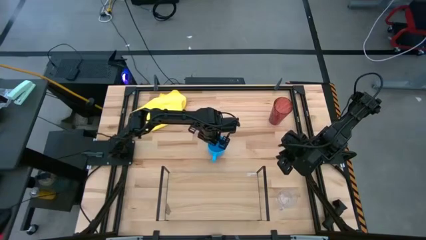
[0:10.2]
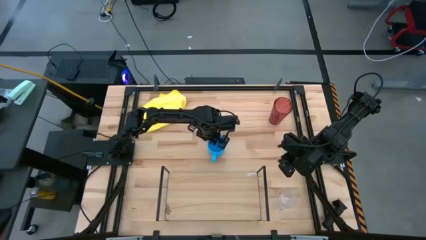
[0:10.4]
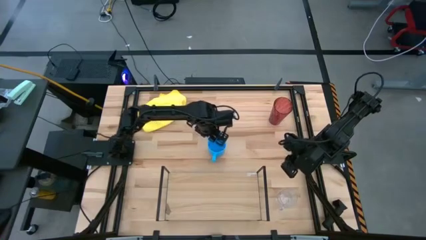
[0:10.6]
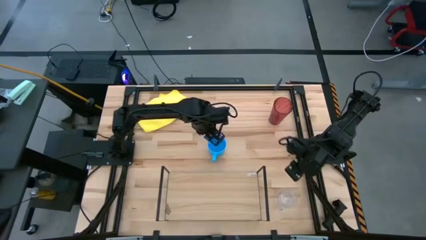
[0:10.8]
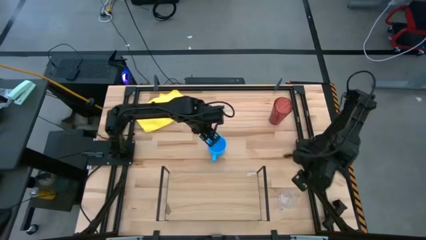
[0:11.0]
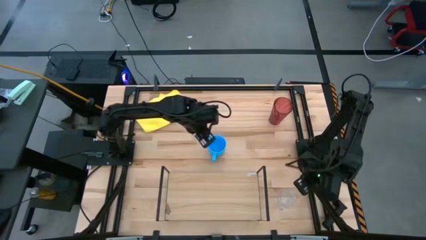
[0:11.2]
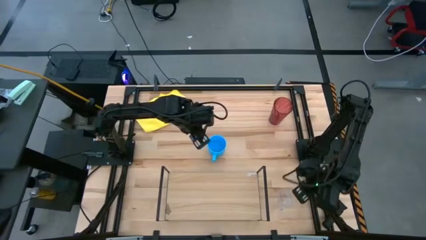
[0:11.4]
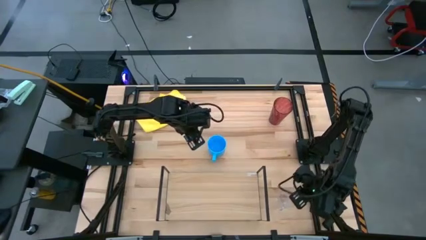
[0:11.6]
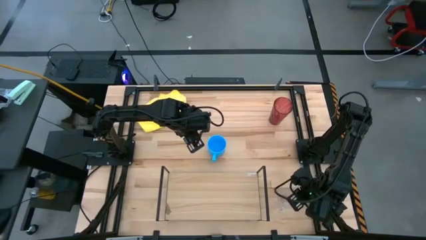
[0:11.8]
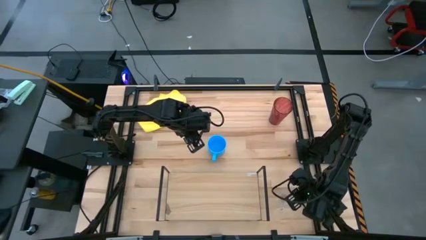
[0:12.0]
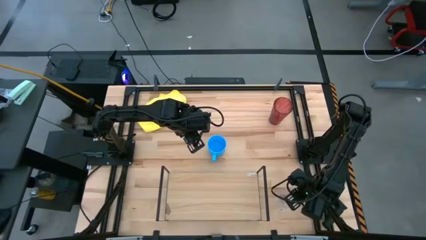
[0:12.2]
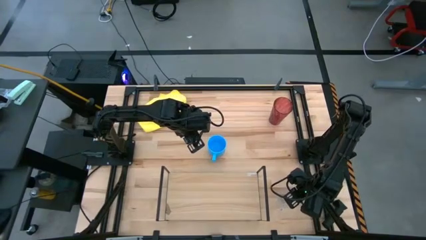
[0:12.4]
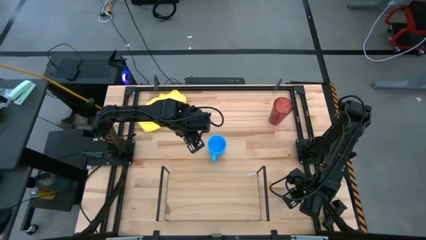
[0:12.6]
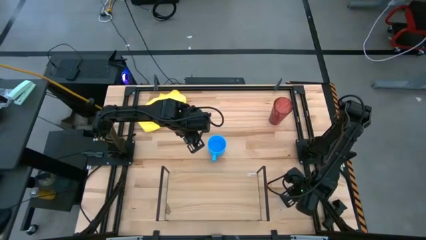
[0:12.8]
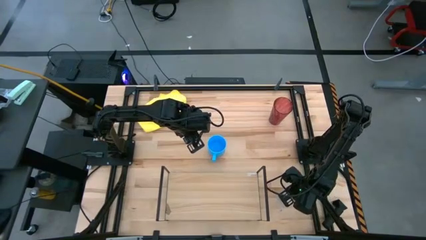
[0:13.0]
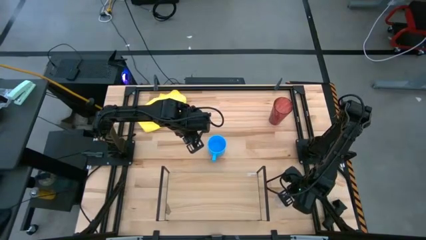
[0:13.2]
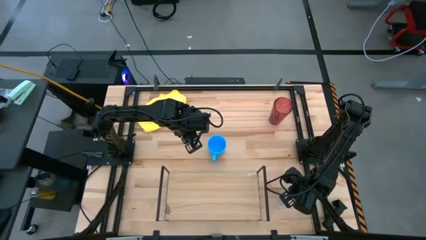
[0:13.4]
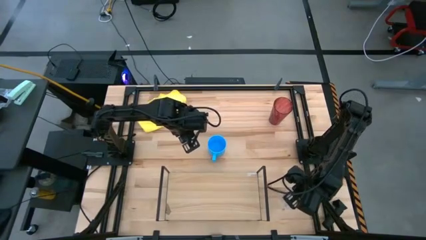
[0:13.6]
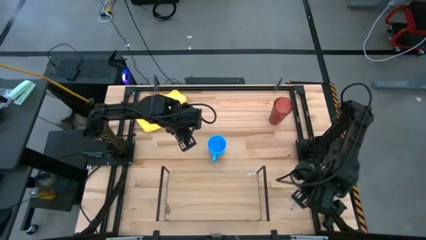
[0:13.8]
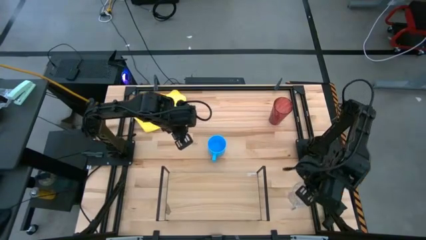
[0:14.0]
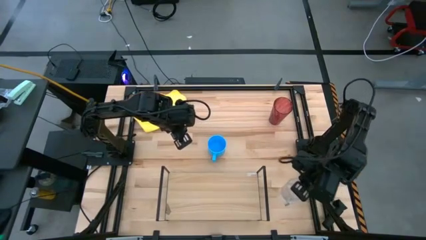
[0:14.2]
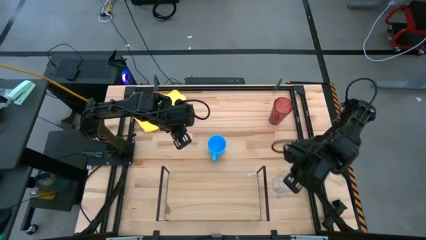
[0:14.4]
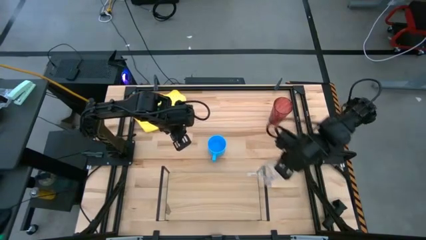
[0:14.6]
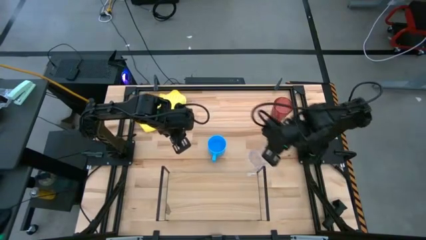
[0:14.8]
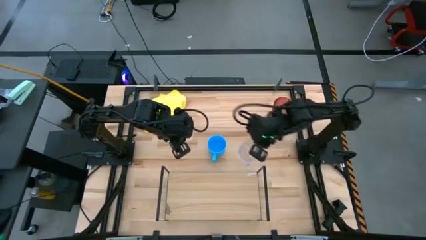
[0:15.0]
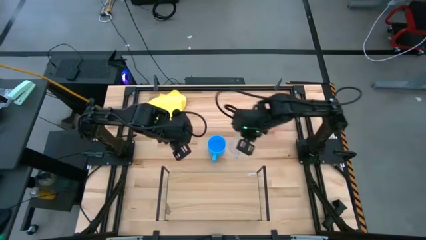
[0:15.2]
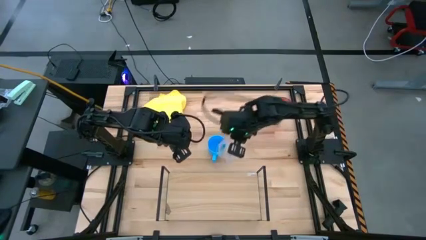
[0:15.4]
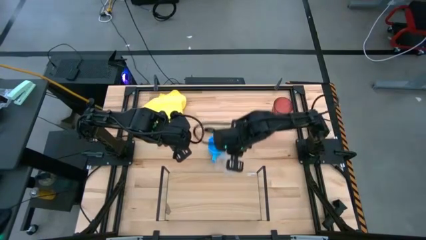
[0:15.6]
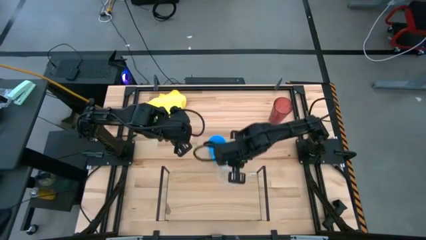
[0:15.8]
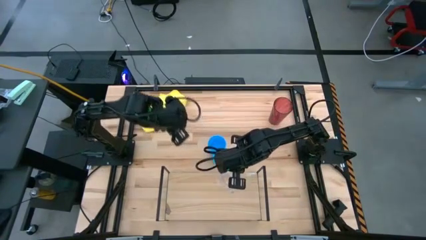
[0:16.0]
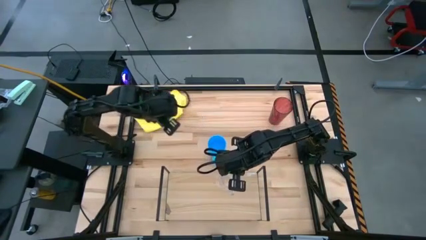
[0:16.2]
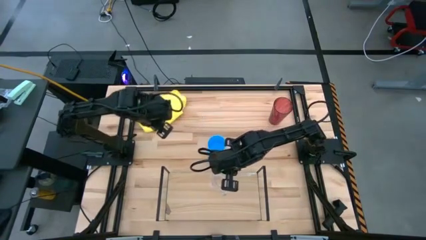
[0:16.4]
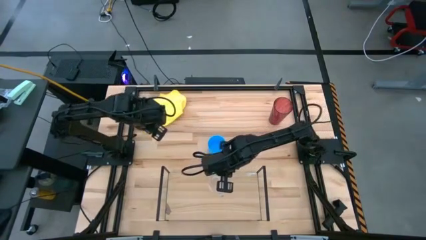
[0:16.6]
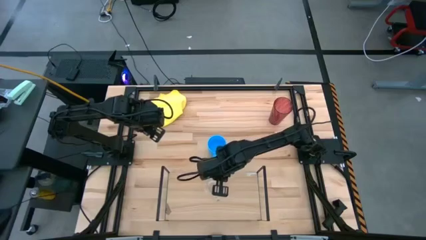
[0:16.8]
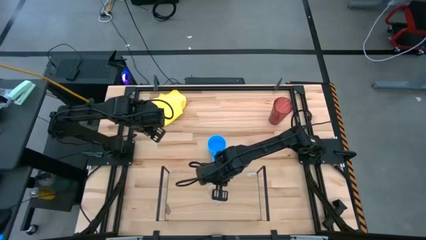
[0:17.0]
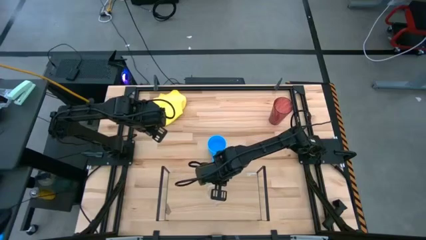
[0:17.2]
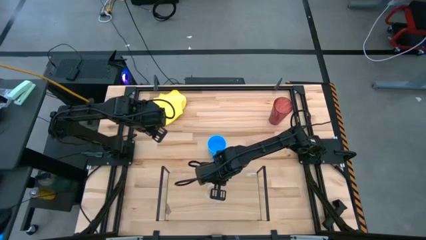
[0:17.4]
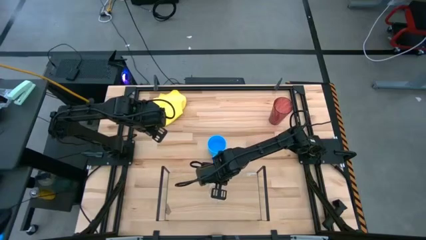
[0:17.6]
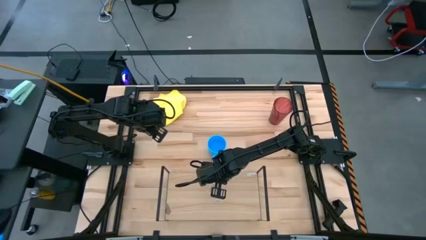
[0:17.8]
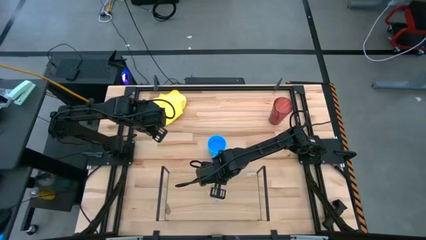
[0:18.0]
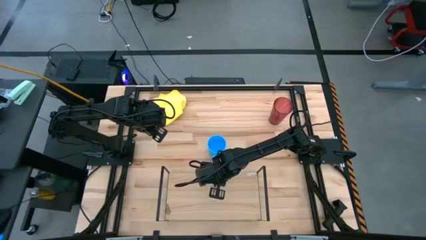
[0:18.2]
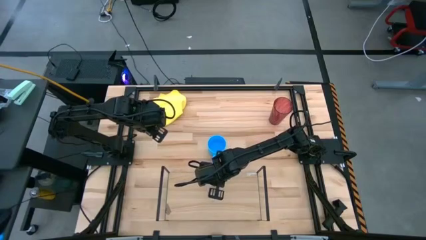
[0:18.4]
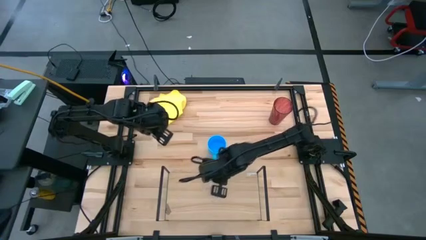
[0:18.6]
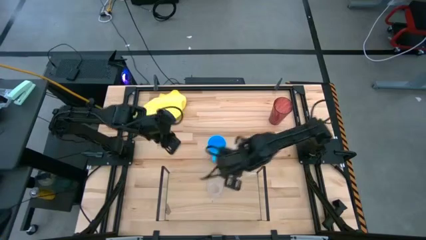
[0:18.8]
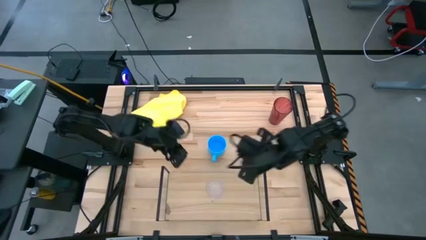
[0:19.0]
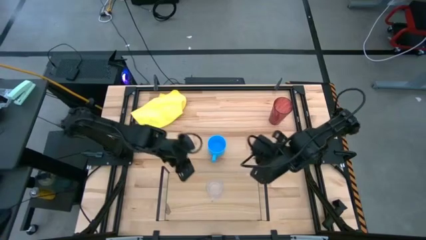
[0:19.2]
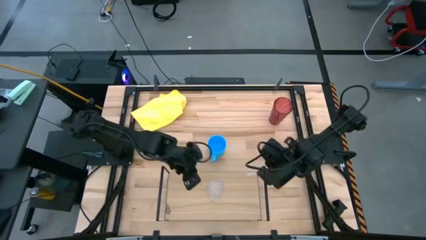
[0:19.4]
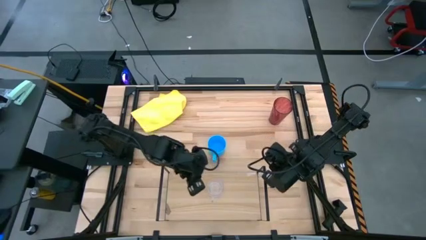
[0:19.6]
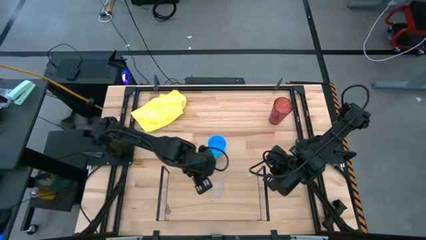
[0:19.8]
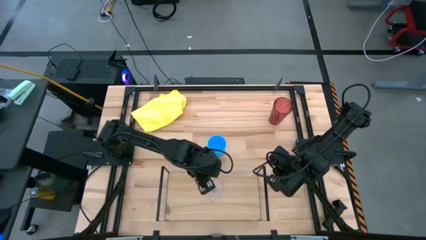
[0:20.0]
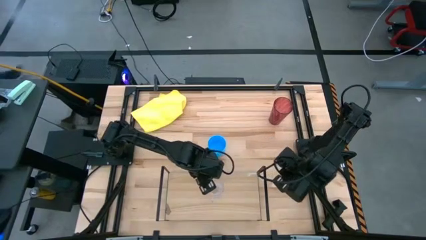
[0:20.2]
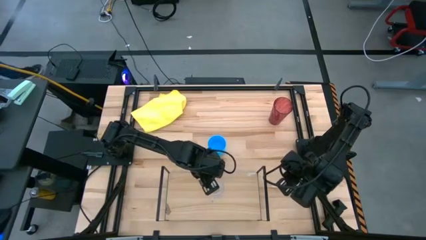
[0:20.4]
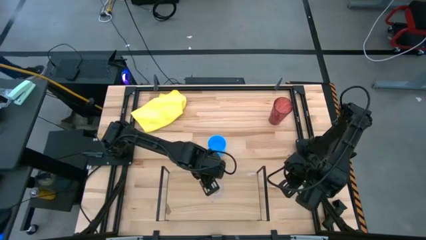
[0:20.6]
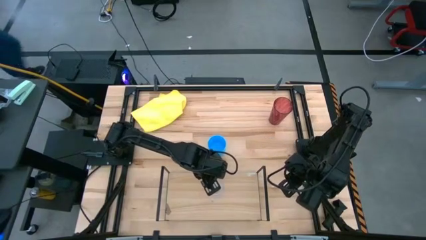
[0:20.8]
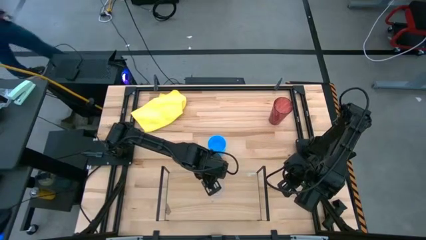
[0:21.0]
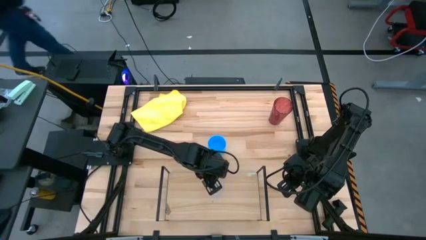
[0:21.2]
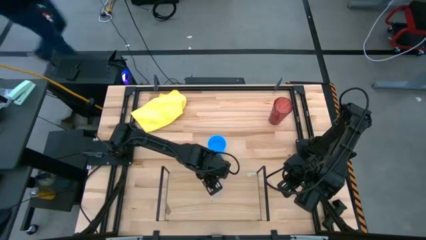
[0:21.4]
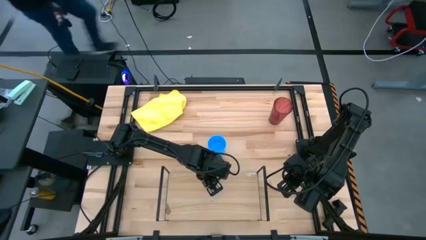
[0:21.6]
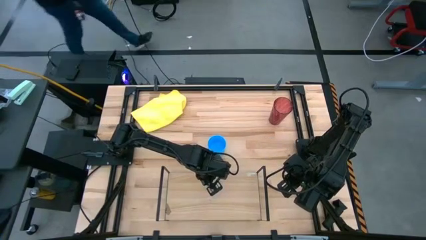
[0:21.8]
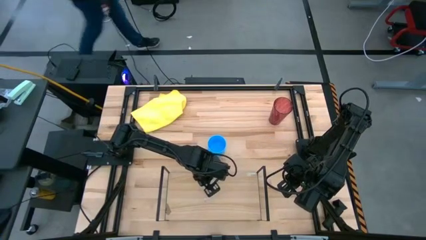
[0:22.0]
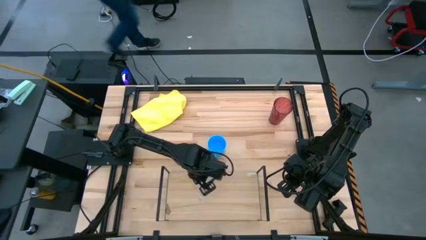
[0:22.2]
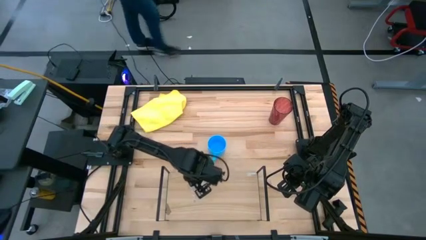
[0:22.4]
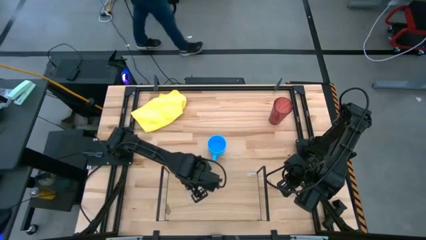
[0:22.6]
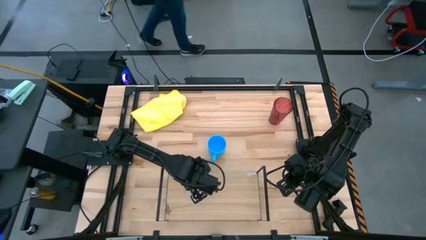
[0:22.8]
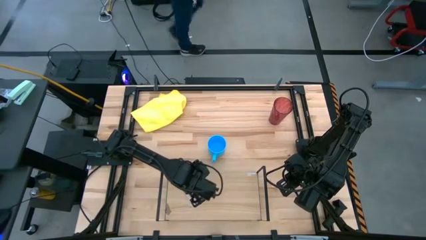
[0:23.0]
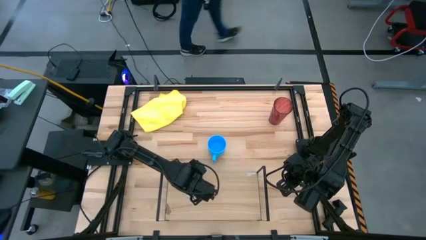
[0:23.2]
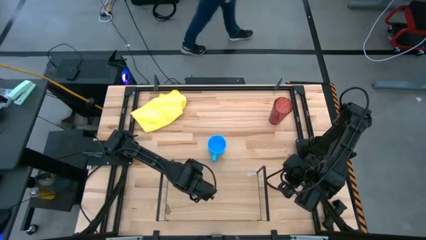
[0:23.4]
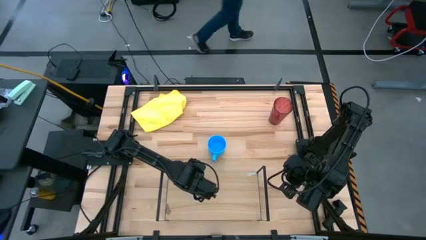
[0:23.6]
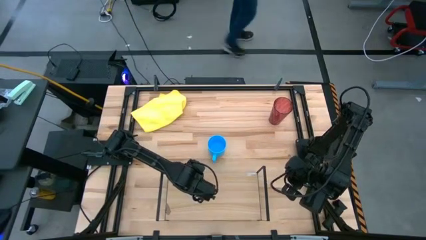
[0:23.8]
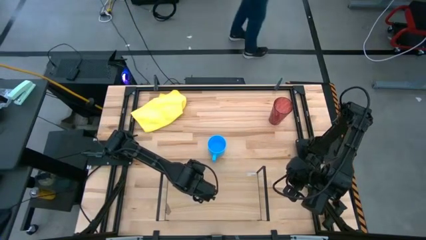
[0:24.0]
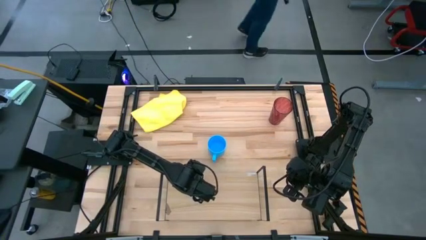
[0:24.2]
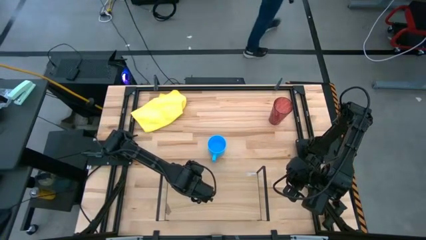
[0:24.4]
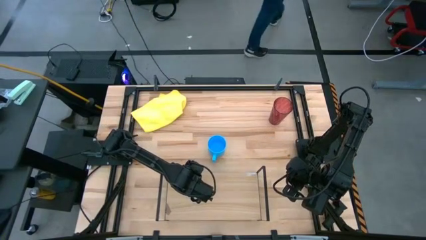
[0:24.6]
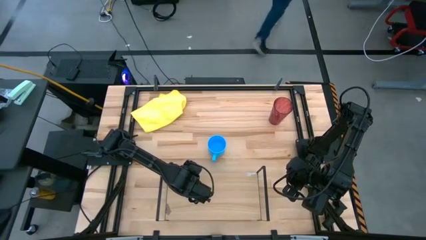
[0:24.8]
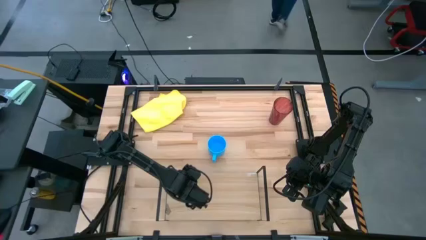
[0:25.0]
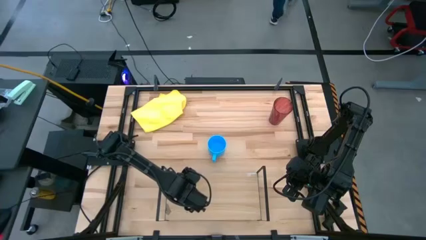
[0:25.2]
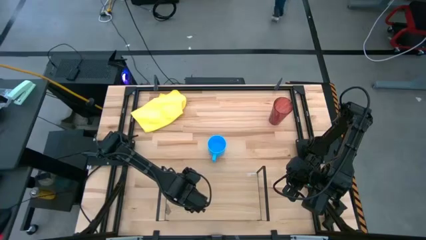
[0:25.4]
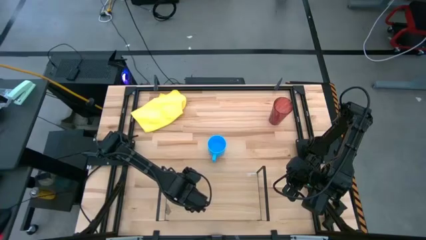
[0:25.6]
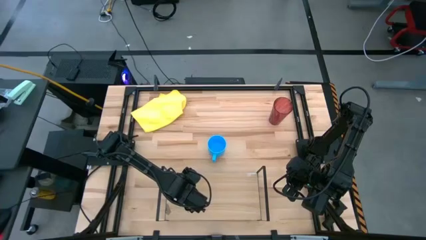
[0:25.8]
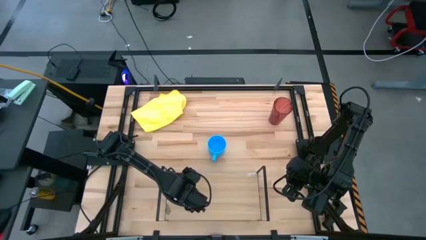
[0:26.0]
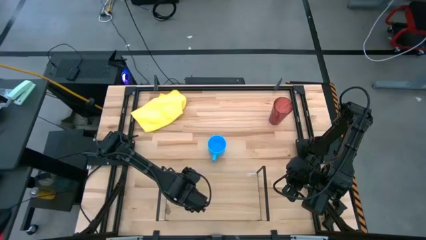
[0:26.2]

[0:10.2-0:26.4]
Task: Stack small to large cups/mugs on shelf
Put the transparent mug on the shelf
